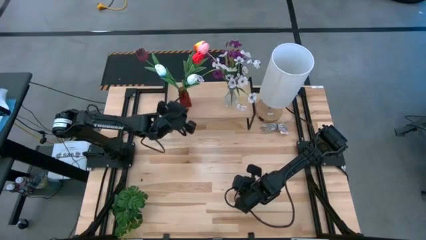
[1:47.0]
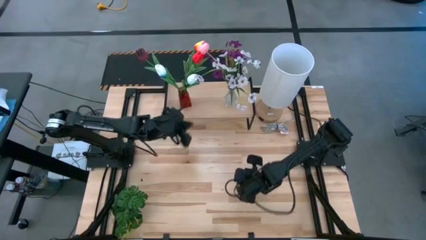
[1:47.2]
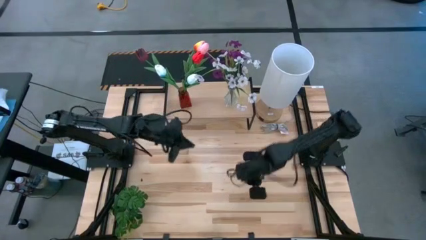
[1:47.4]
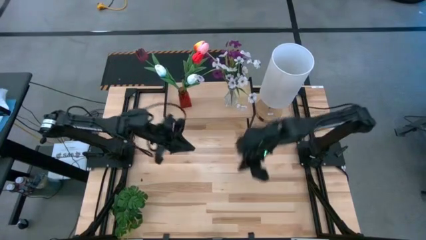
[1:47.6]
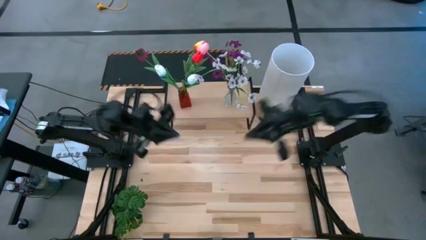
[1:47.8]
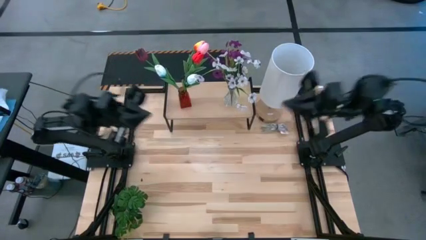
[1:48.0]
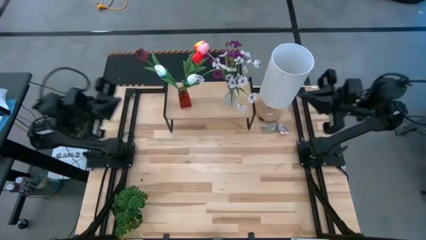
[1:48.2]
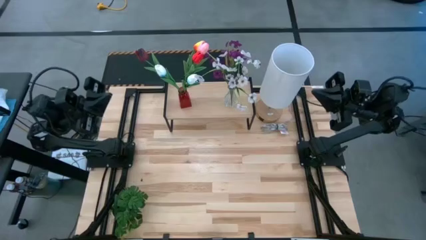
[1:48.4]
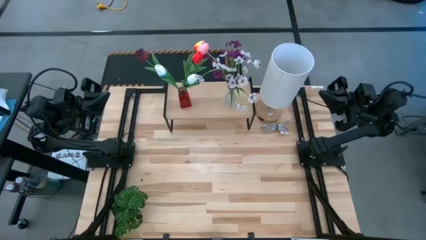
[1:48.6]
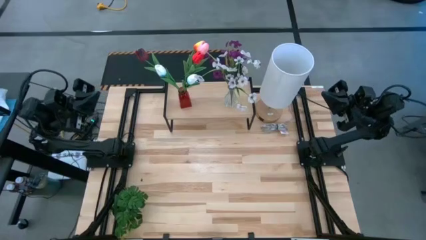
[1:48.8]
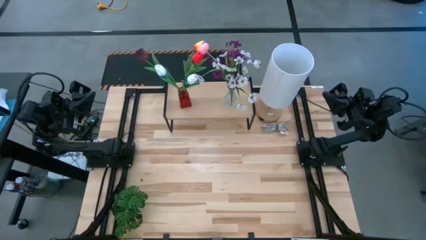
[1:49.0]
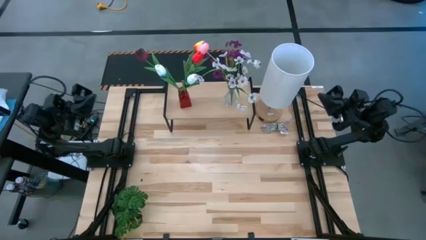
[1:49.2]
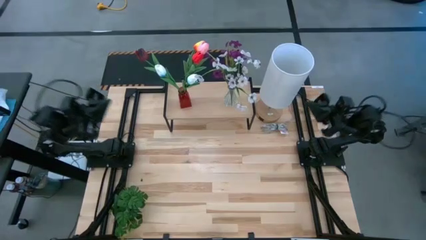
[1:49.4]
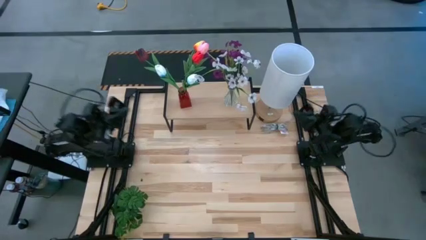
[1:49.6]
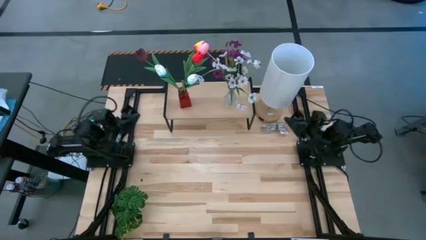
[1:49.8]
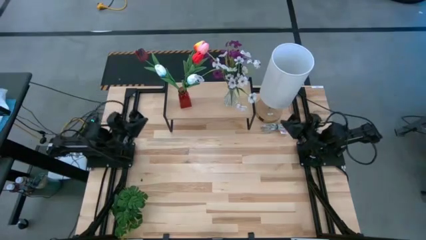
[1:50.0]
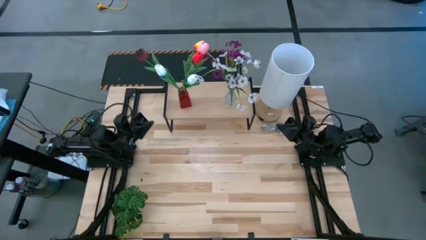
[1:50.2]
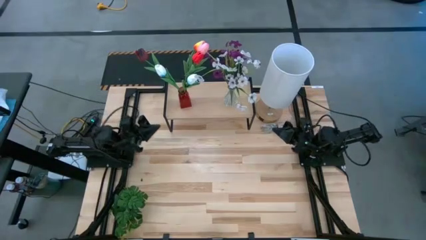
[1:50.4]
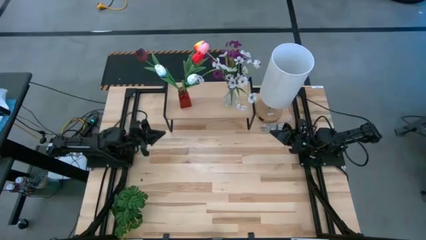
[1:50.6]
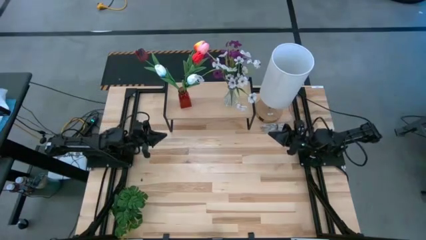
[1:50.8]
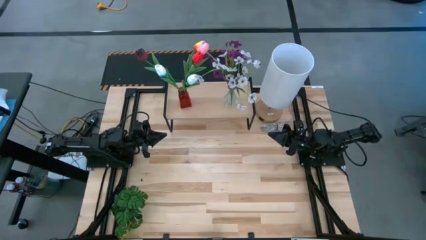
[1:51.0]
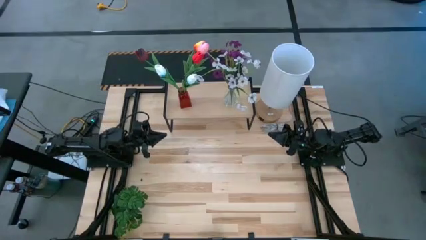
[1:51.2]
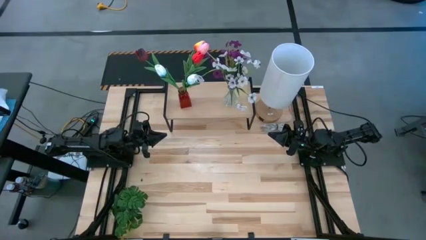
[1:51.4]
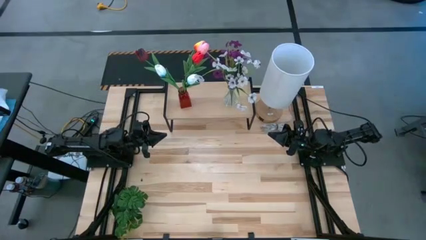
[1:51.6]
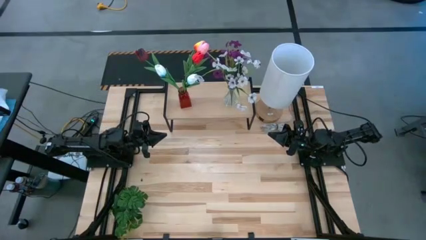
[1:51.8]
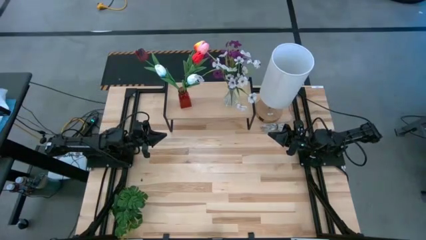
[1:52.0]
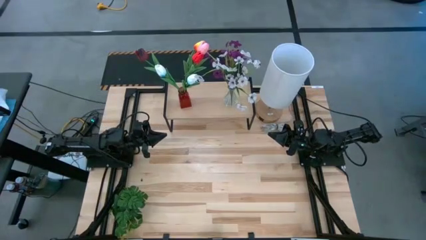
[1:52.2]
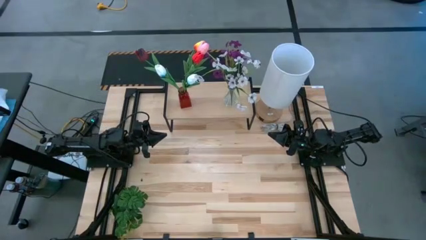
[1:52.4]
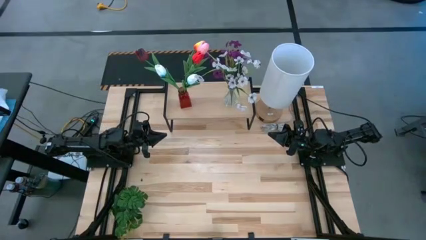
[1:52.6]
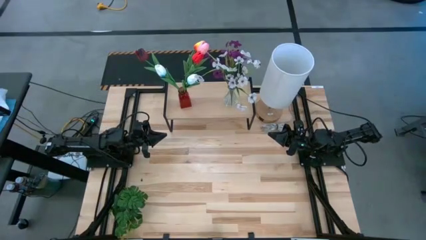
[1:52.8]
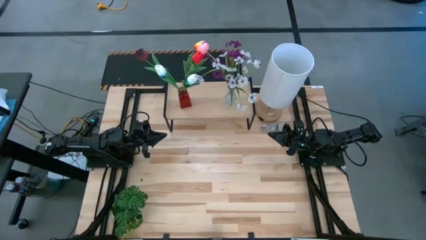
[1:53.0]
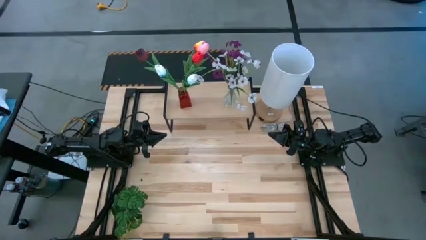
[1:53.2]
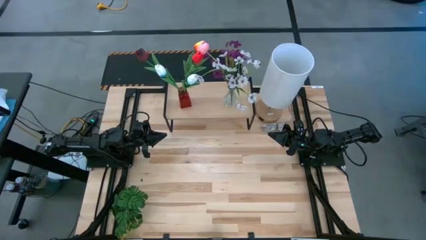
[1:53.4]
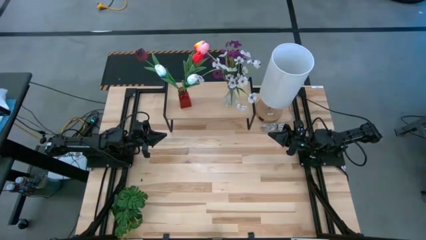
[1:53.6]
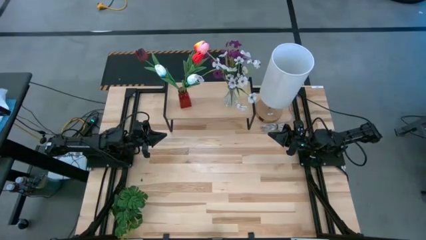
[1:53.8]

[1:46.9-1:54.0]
Task: Pick and place flowers into a vace then onto a shelf
Return to Home Position

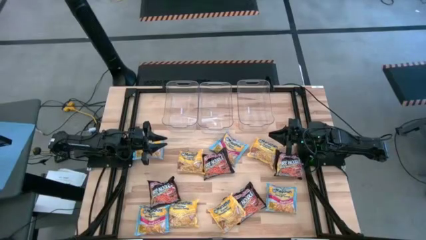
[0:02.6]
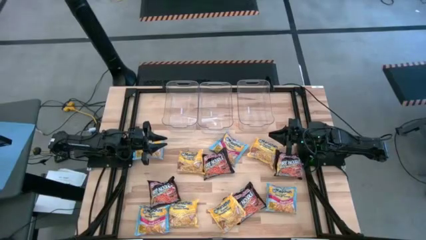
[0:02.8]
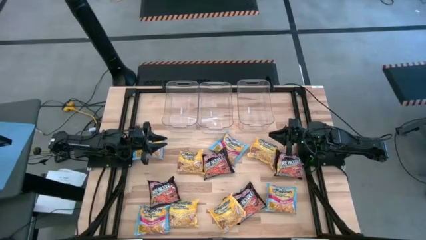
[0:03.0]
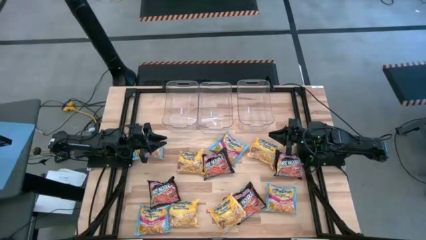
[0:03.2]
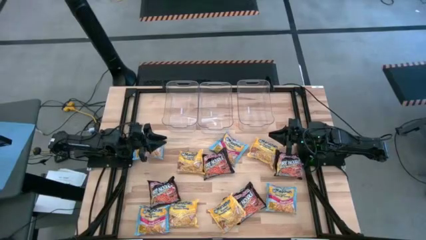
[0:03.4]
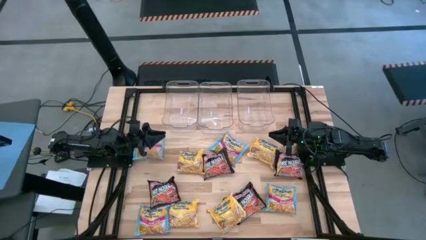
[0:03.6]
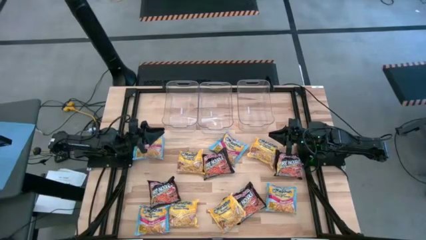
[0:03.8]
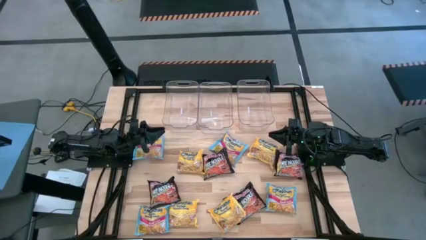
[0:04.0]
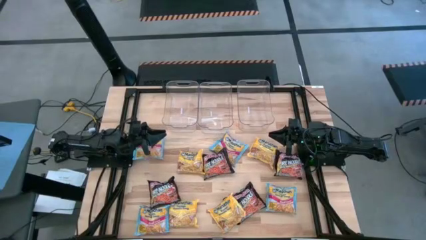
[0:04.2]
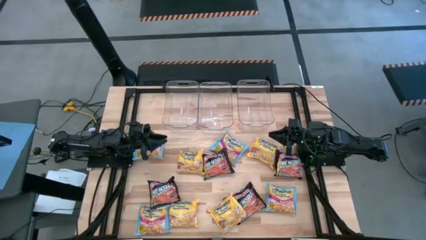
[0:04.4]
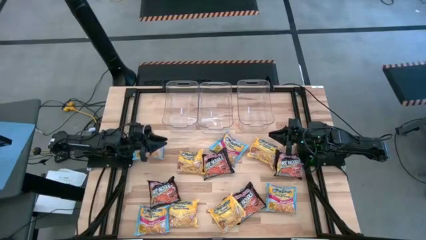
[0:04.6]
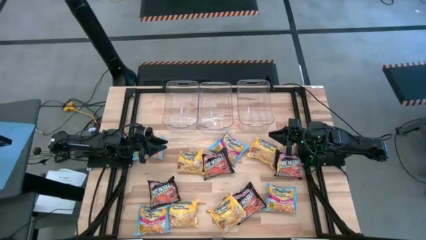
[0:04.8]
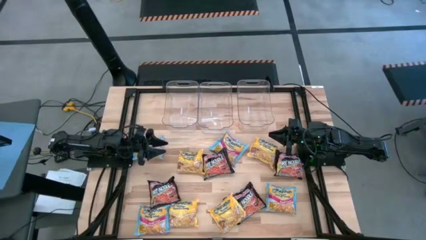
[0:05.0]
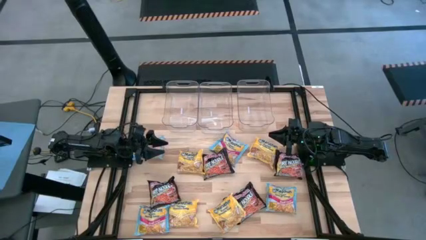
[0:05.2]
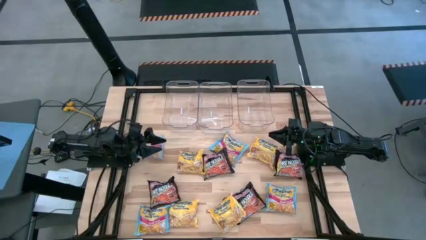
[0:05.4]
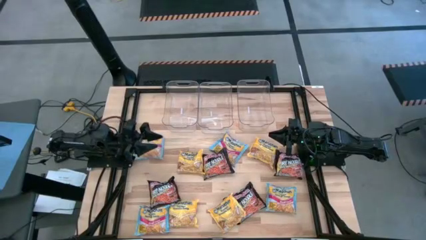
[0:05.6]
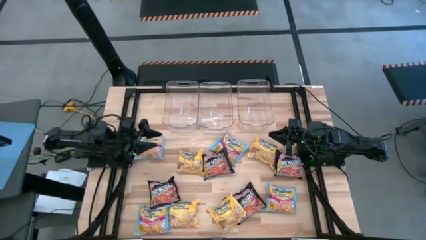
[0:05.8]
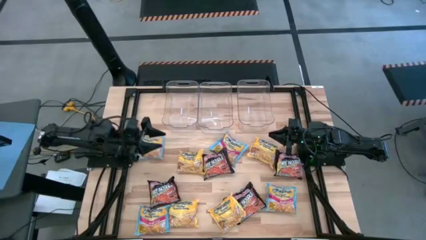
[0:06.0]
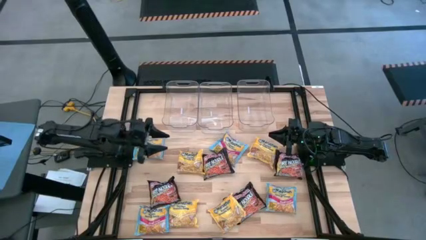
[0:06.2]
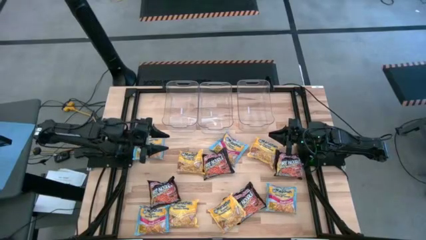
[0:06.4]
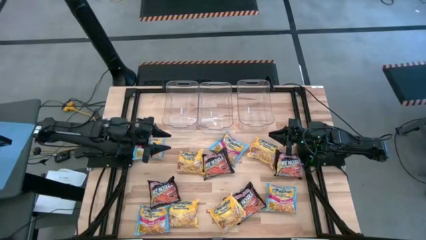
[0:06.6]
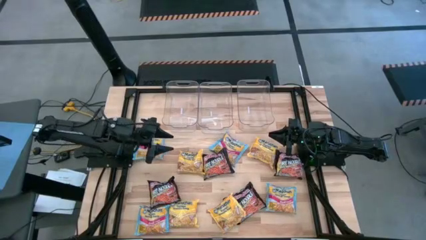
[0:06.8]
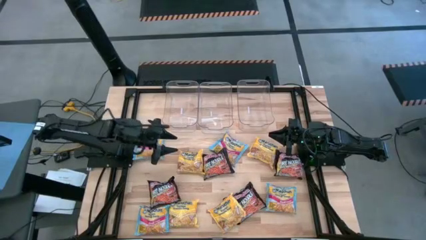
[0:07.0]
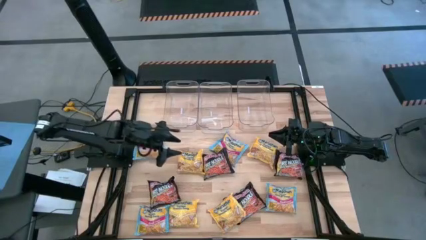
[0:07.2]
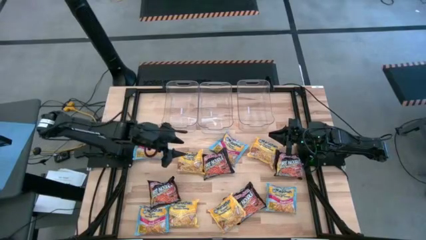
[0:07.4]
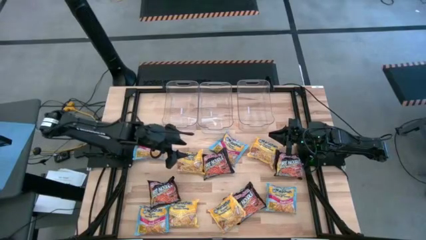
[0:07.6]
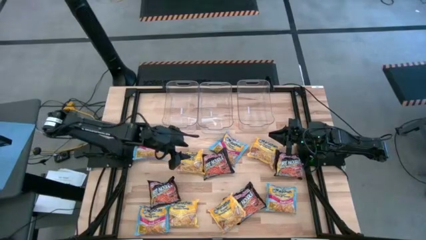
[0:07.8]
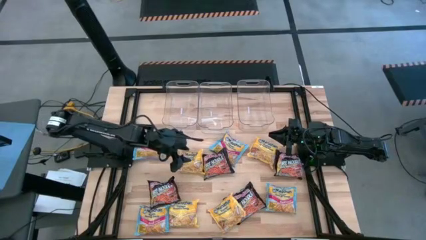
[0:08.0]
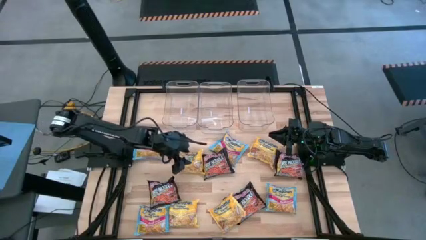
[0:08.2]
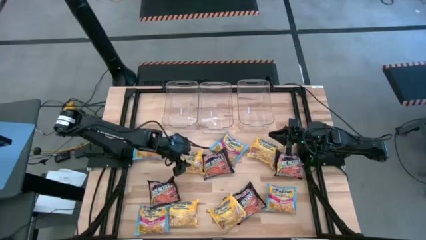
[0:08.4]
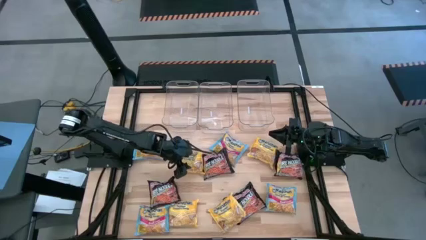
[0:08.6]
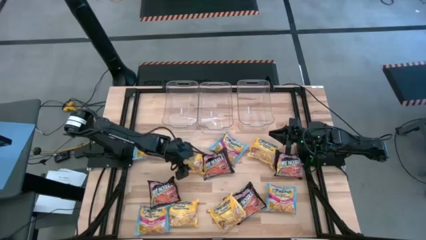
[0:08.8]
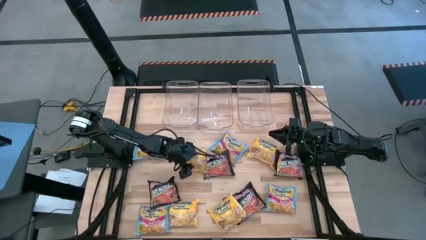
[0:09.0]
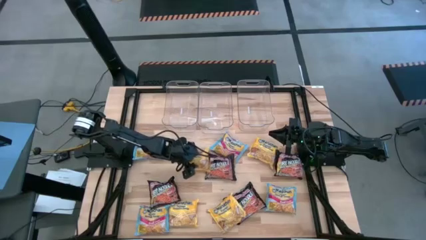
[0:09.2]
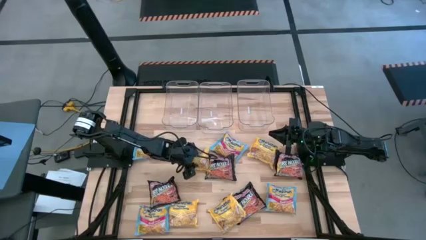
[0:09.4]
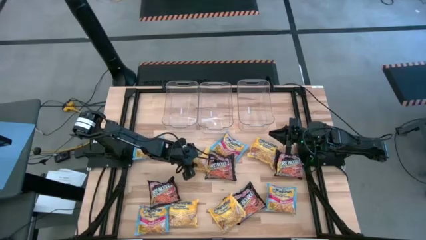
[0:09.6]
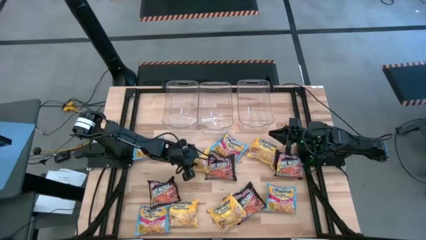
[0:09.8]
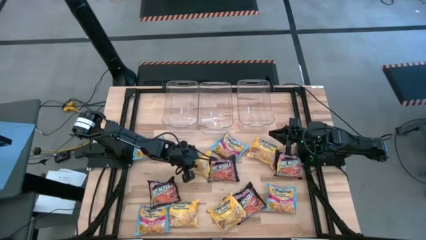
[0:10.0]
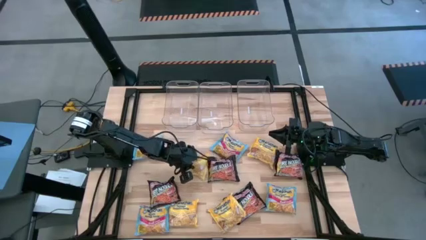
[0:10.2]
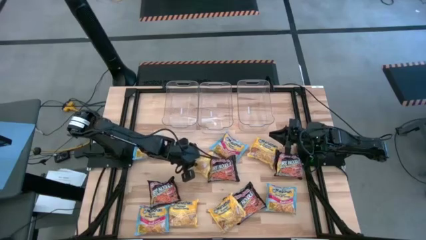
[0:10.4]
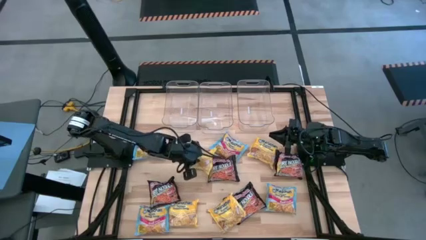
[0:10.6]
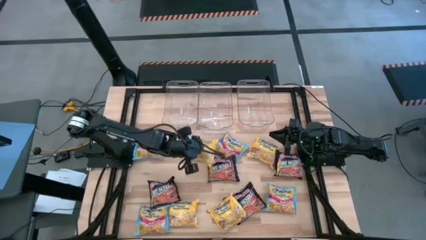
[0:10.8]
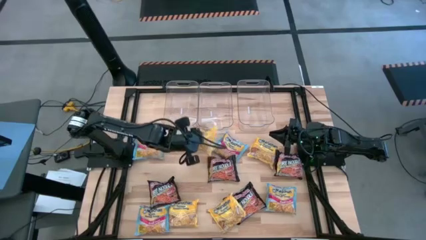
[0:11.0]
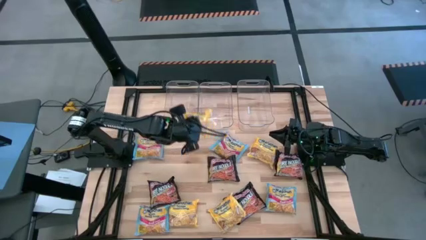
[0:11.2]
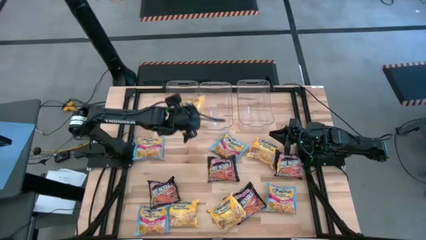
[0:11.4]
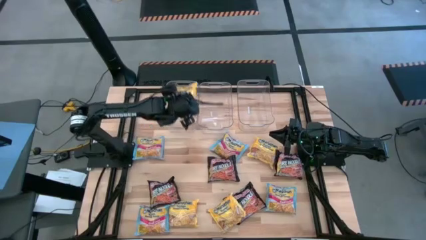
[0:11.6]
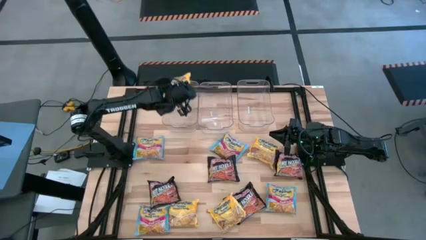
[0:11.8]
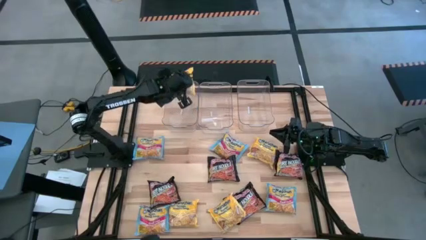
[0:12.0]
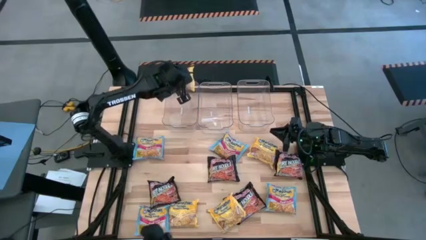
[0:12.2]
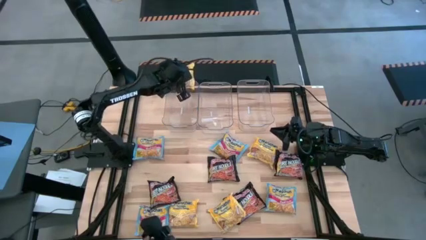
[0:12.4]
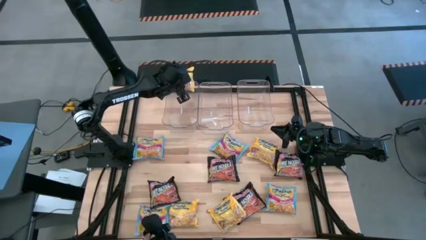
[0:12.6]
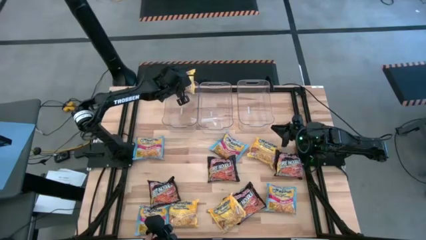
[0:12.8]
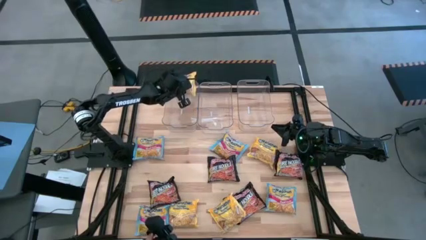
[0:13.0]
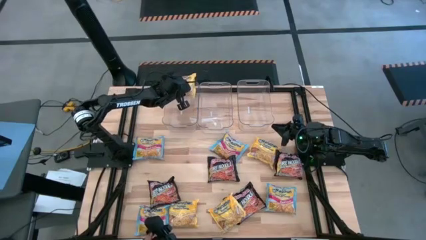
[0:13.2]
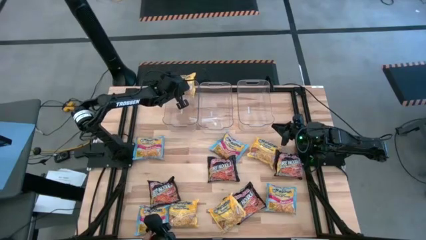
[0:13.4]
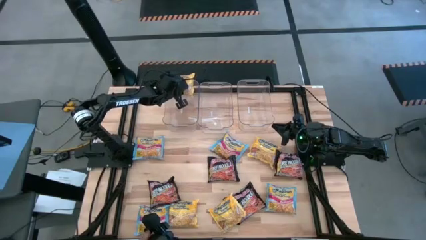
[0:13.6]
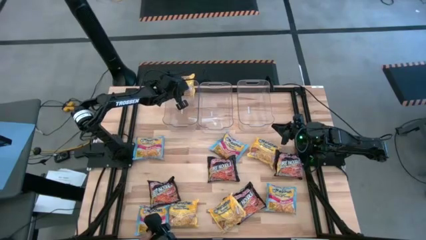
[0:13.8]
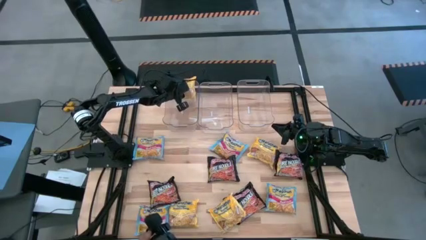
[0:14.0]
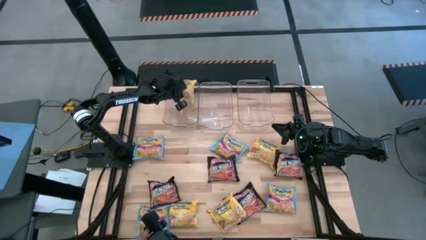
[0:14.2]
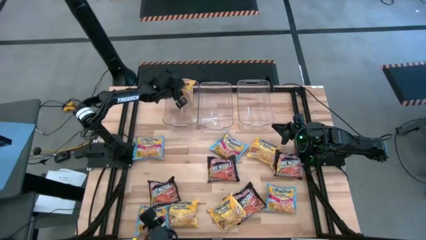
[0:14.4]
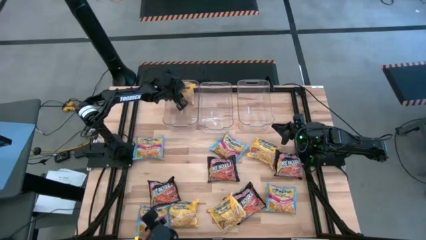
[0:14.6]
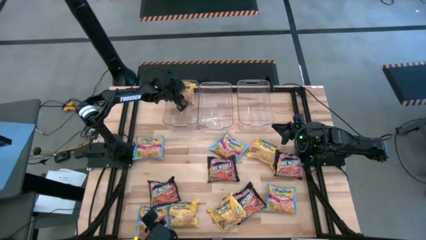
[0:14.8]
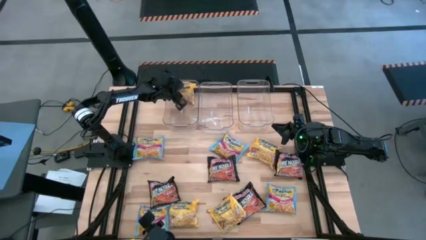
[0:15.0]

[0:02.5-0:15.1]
Task: Sort Maruchan noodles
Put the yellow noodle pack in the left transparent bin
